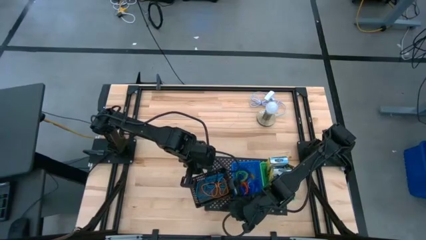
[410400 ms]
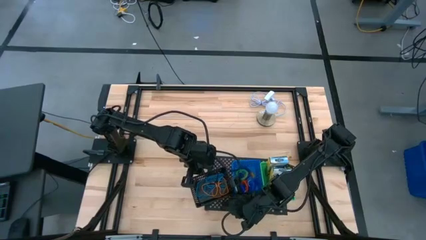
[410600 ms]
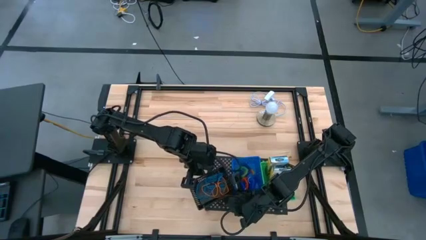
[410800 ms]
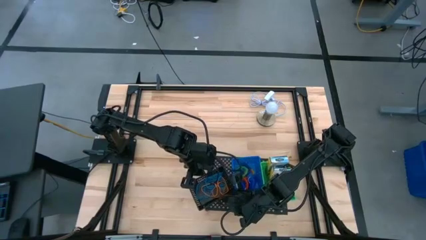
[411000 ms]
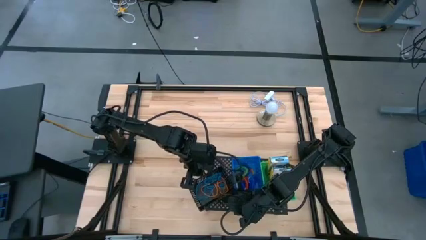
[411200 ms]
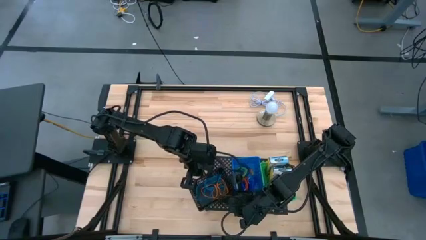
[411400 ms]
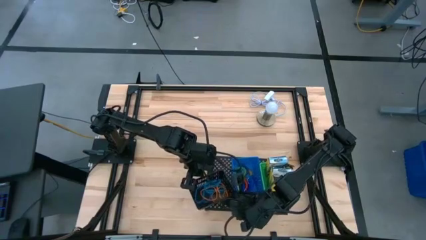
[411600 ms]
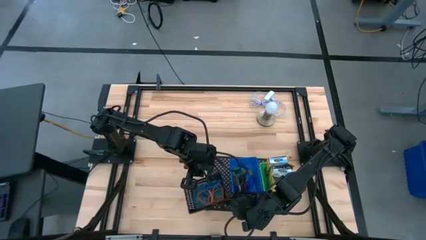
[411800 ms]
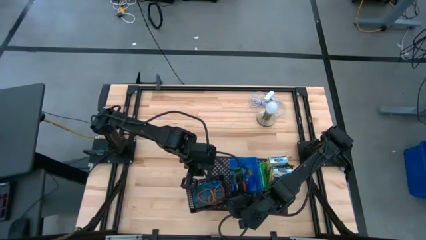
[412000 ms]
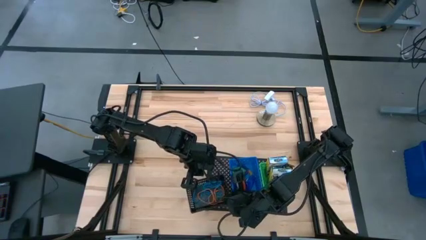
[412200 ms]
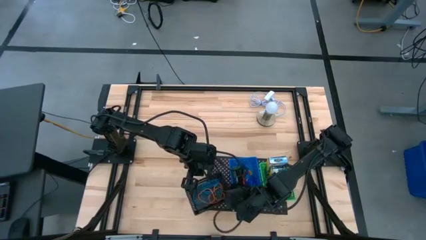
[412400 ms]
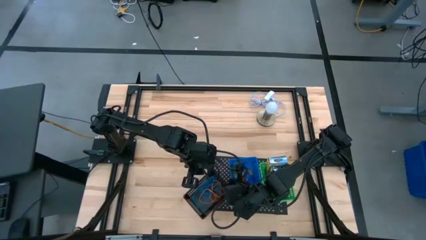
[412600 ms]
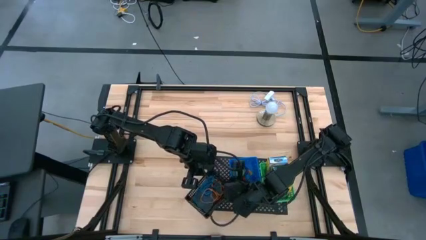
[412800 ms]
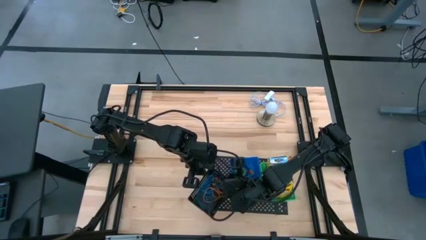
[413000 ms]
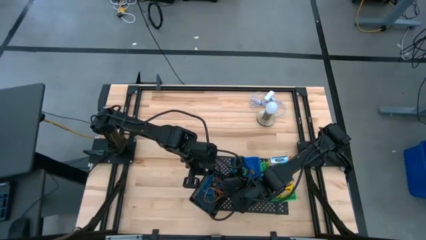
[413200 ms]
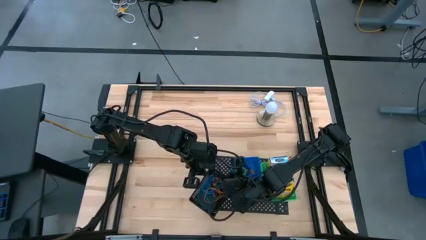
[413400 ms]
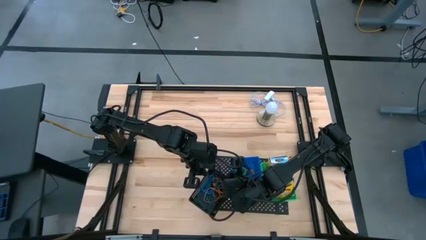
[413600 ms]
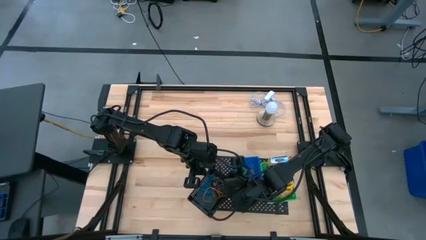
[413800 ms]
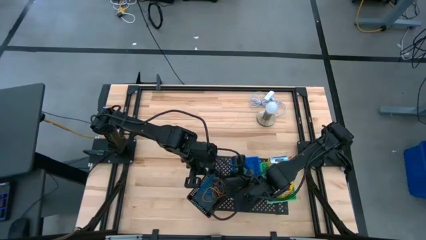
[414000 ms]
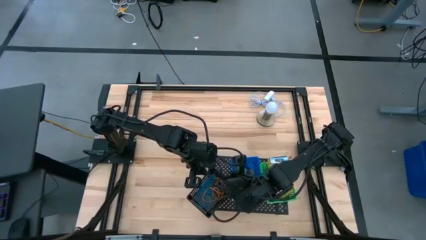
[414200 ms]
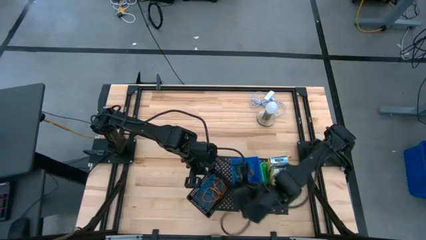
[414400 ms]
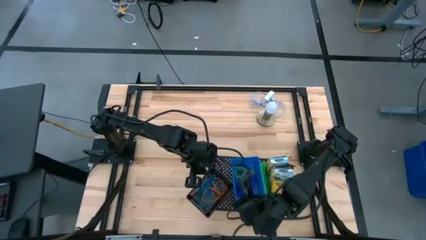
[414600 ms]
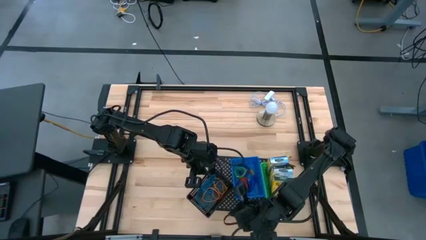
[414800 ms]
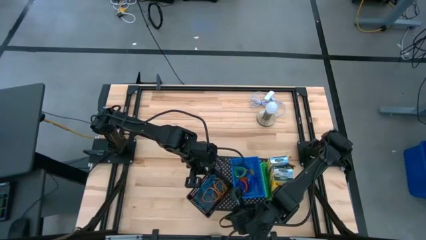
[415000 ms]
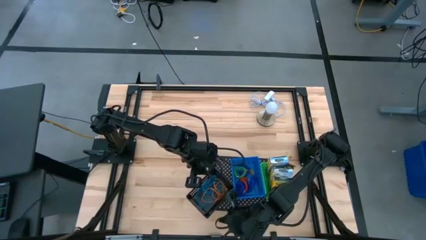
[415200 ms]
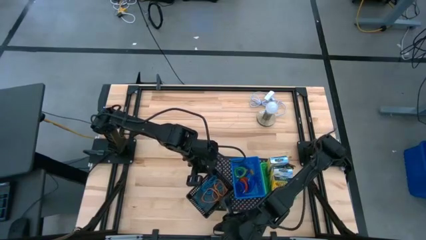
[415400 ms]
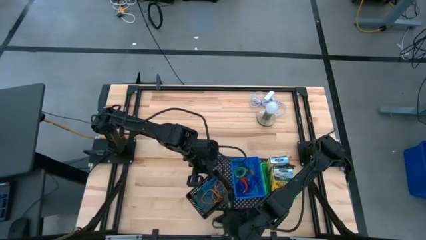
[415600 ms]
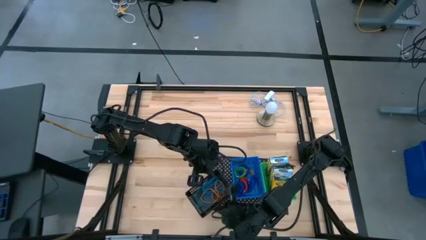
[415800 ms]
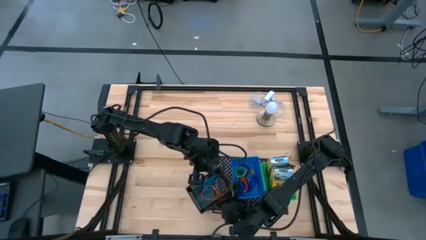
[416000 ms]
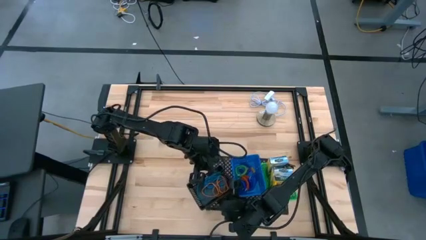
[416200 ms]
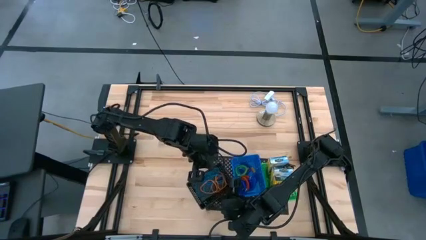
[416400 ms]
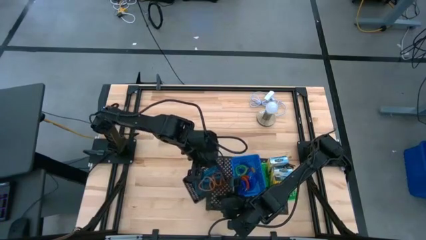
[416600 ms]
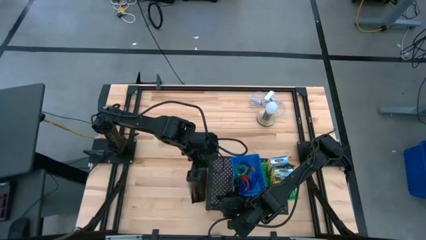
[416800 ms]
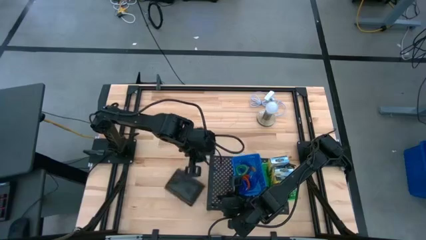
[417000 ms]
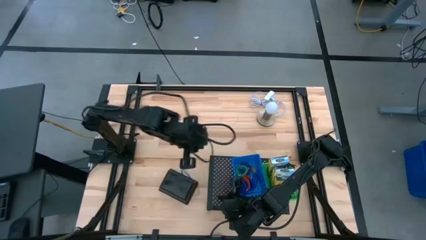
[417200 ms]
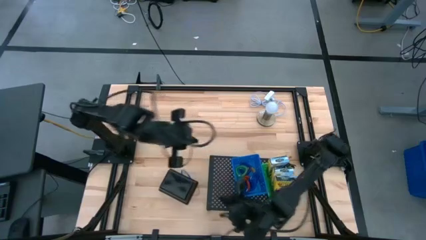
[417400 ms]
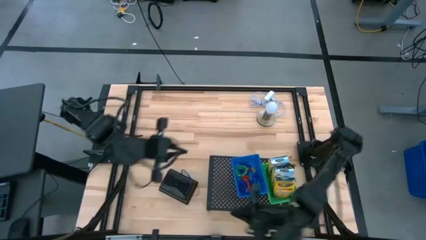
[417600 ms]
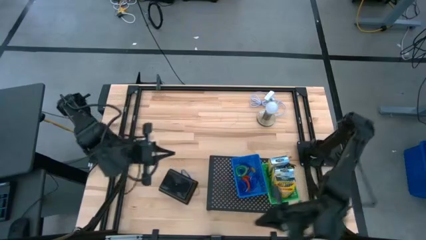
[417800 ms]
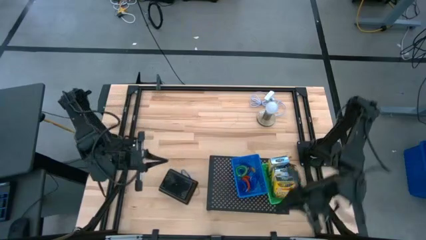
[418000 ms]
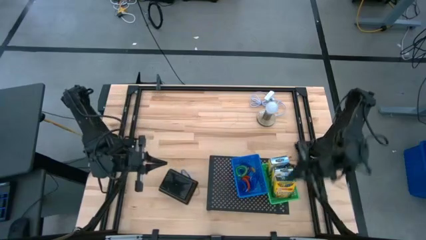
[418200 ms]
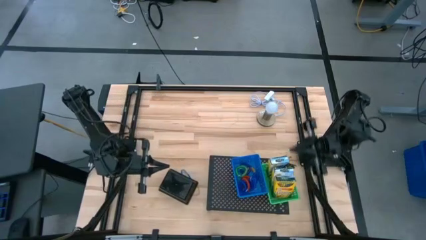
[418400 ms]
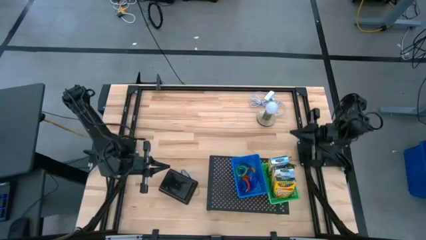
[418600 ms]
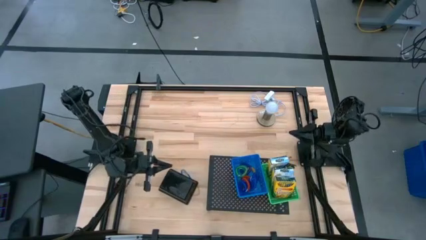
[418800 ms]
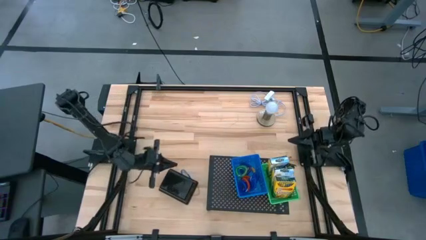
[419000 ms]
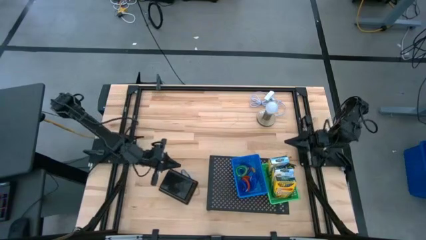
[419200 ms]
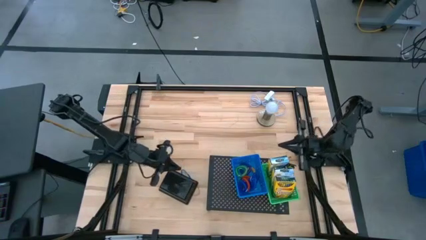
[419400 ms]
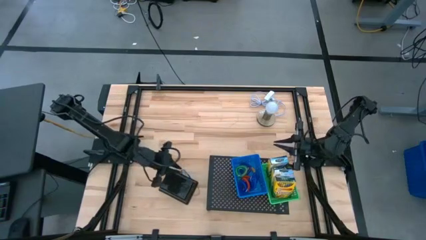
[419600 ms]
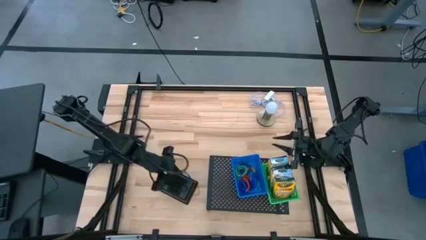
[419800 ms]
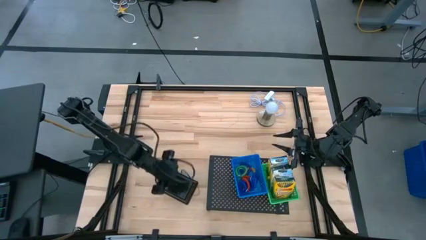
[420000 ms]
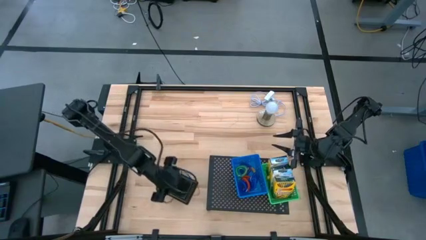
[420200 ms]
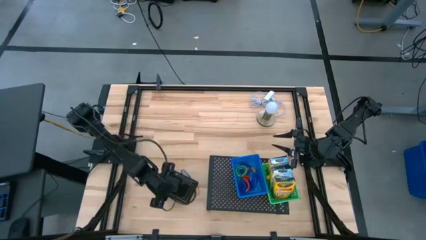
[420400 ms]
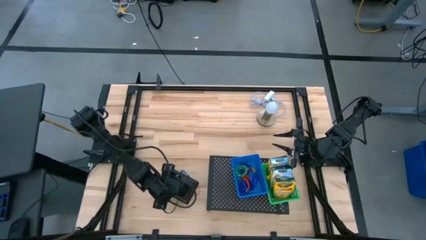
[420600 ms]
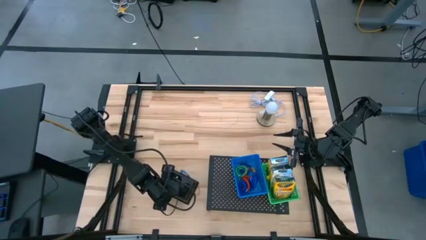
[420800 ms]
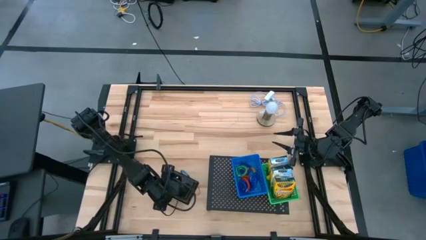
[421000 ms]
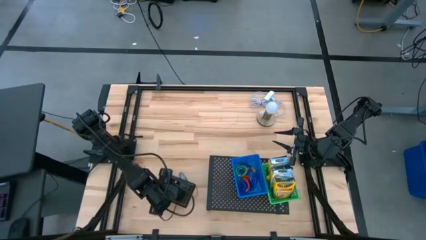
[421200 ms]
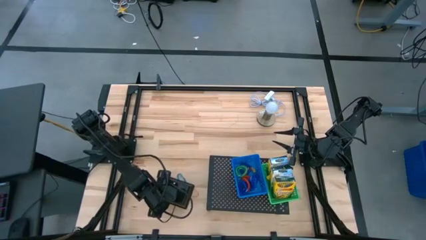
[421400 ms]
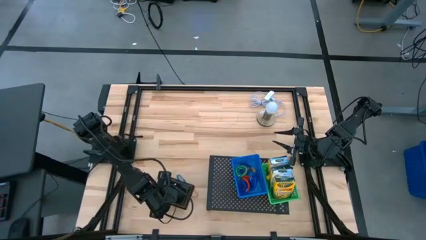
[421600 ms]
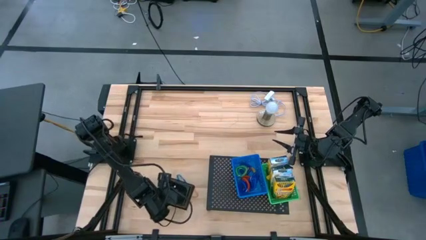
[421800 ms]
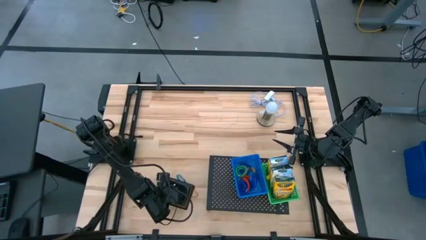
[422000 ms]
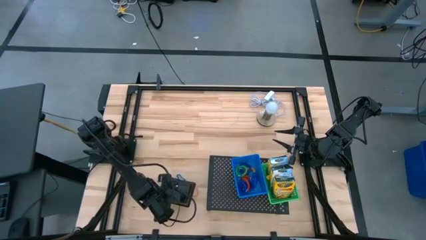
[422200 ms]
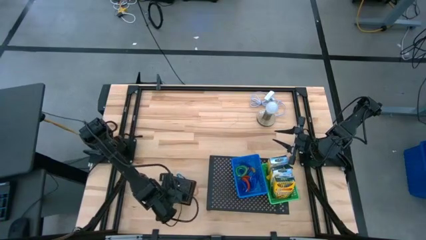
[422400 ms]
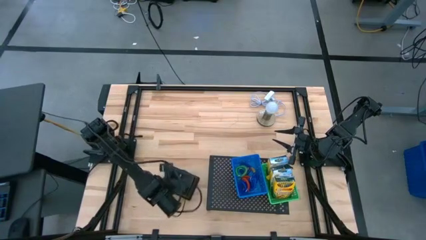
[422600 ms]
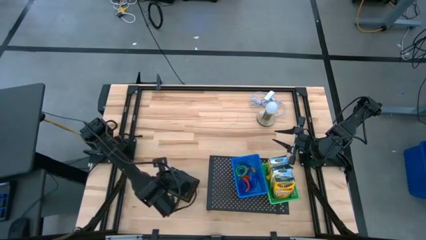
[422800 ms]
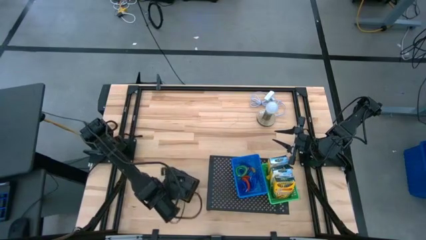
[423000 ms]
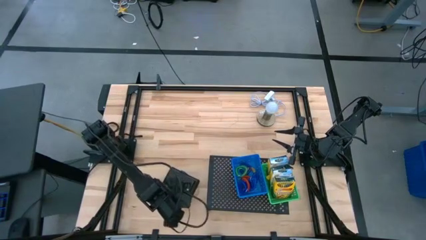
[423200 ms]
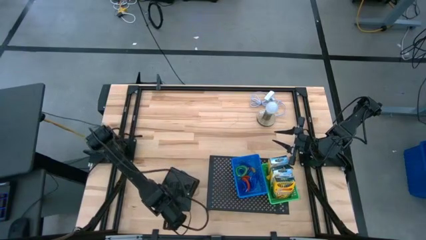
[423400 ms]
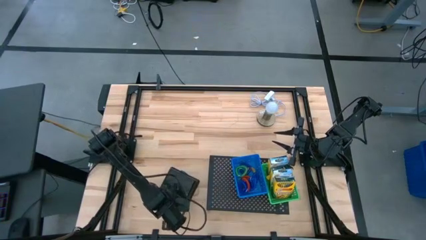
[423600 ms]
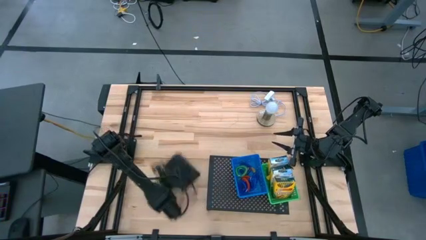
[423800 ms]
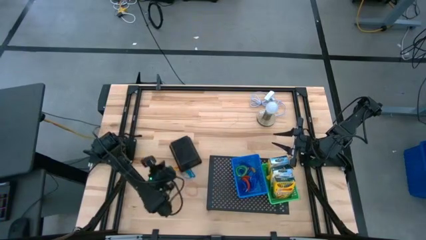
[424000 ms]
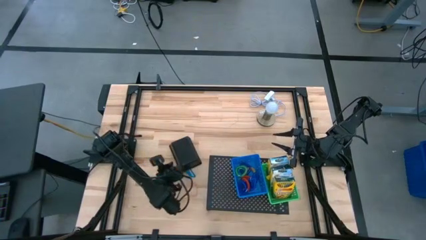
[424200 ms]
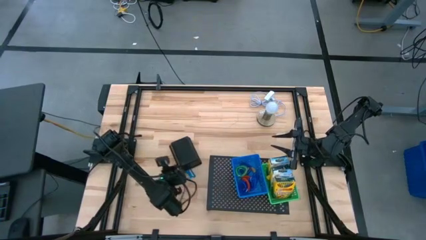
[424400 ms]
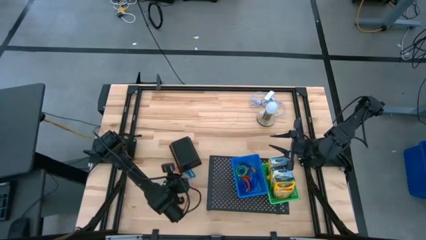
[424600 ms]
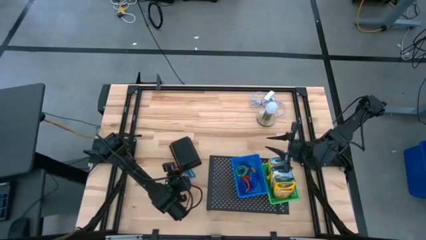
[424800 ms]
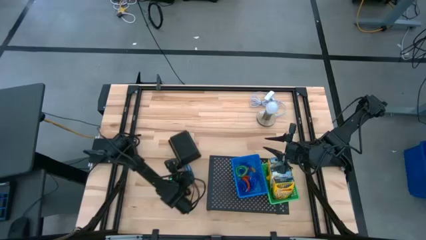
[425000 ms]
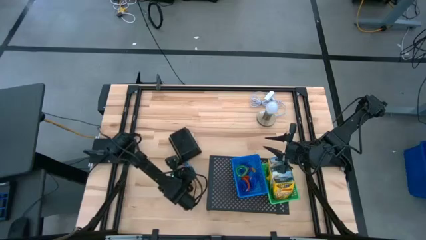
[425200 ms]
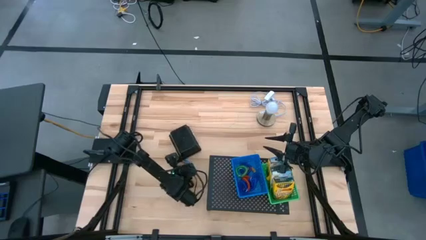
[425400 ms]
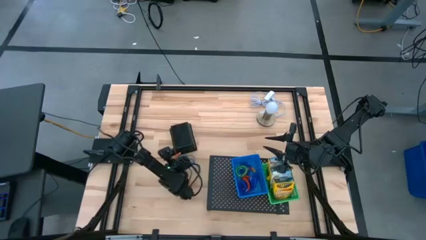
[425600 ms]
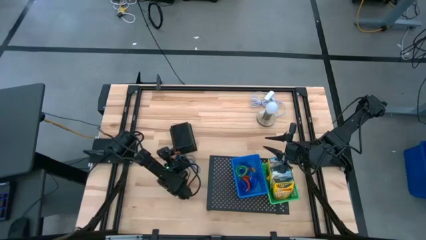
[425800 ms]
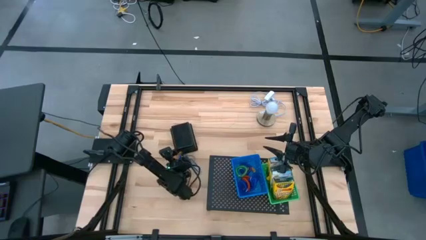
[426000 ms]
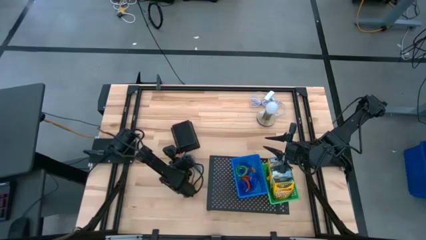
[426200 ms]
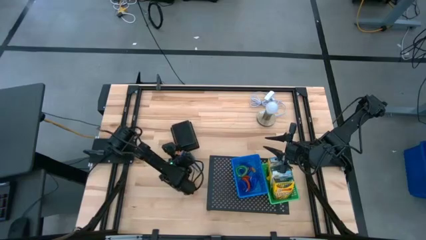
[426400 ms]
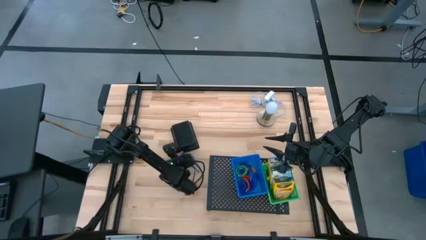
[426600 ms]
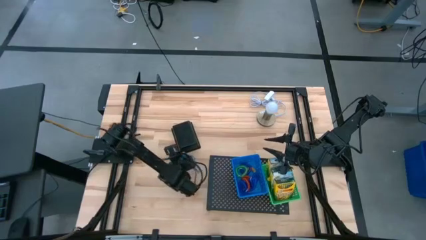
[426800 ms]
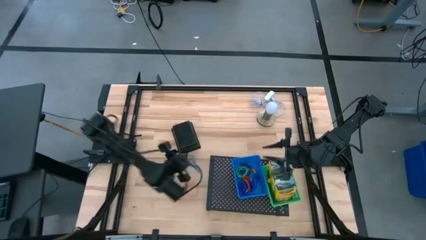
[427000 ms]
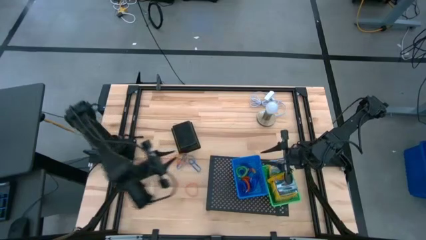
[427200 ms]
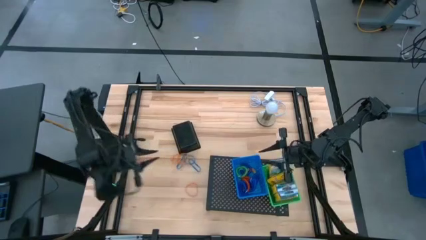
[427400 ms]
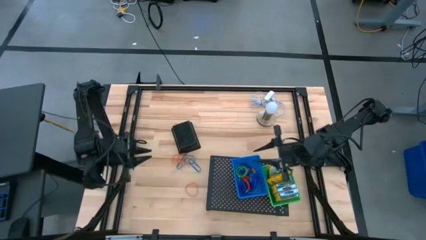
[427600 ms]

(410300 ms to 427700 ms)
Task: Pick & Place Office Desk Supplies
Put the black bin with the rubber bands on the shelf
